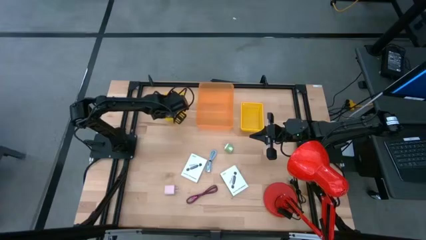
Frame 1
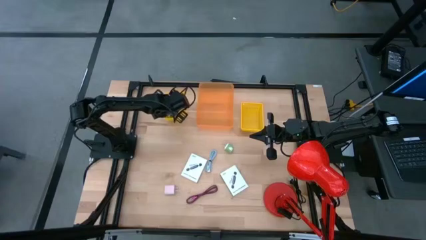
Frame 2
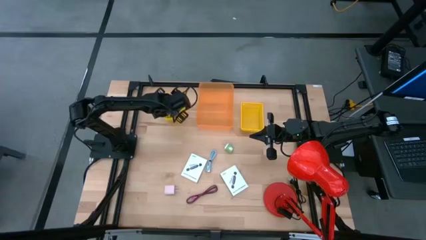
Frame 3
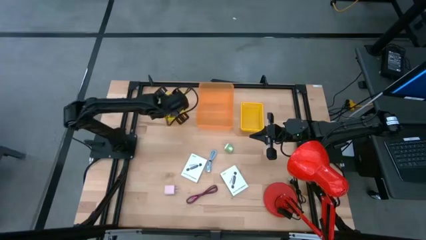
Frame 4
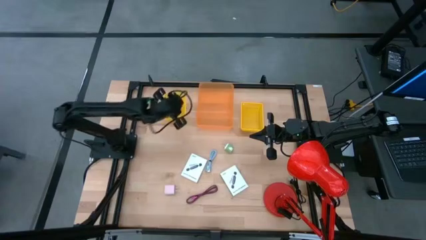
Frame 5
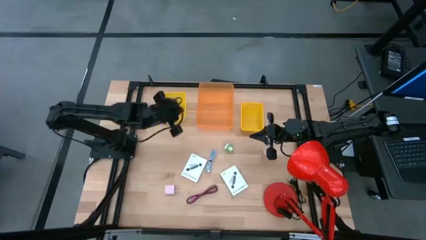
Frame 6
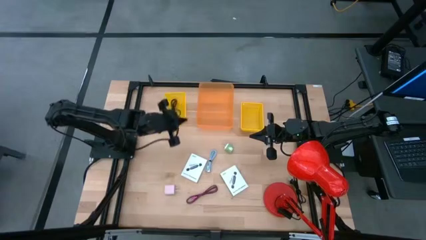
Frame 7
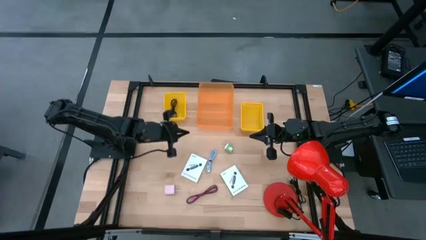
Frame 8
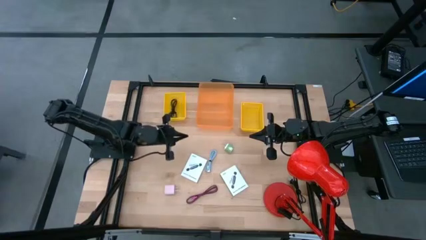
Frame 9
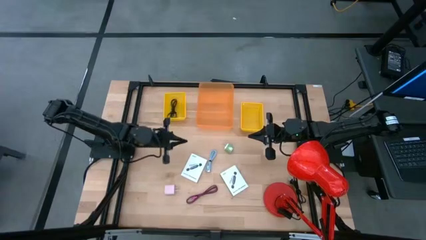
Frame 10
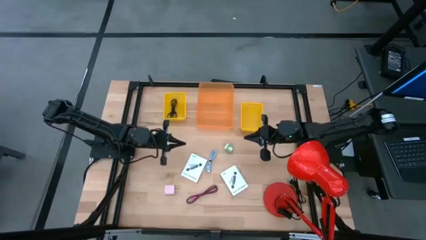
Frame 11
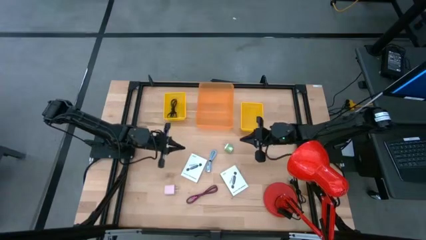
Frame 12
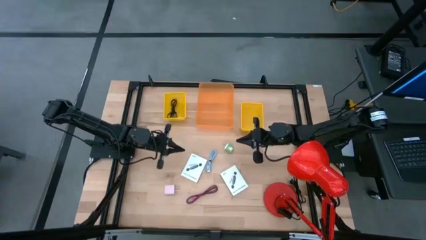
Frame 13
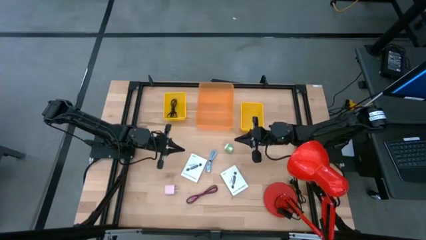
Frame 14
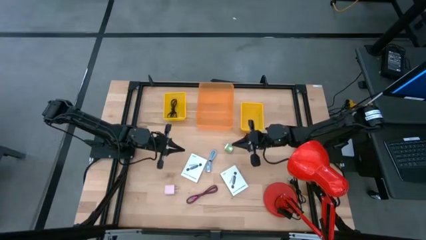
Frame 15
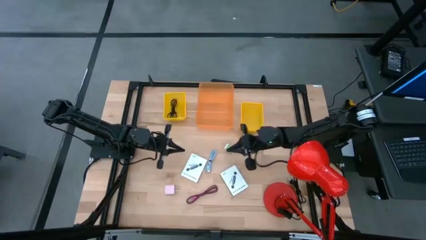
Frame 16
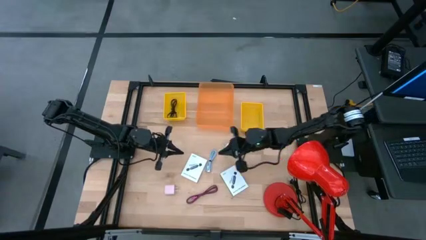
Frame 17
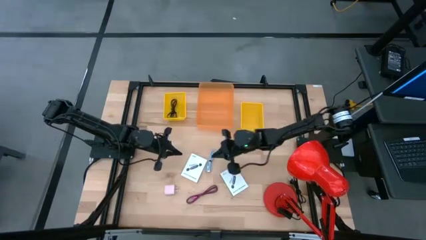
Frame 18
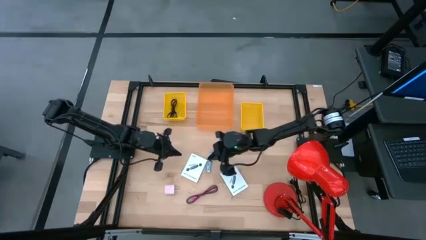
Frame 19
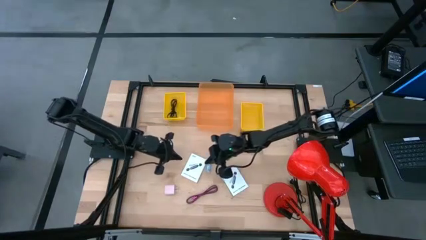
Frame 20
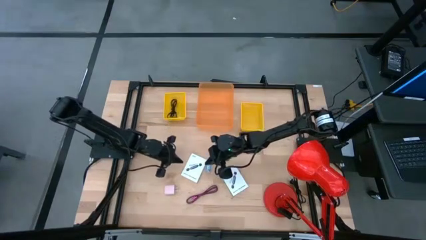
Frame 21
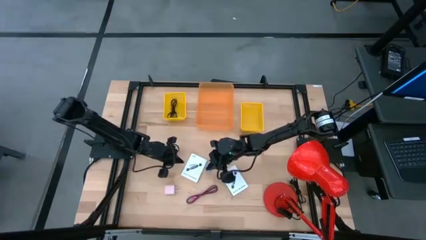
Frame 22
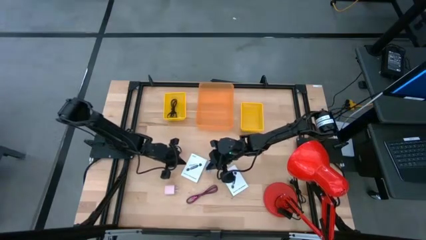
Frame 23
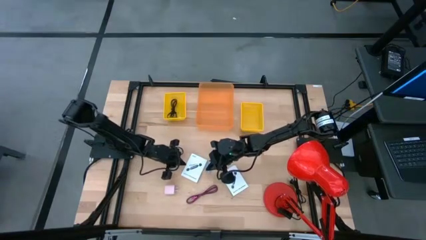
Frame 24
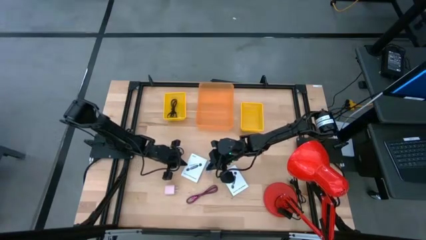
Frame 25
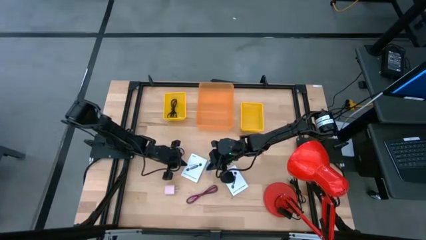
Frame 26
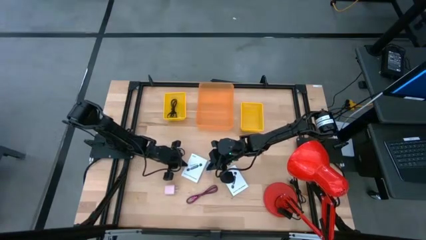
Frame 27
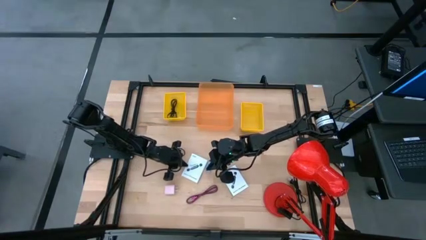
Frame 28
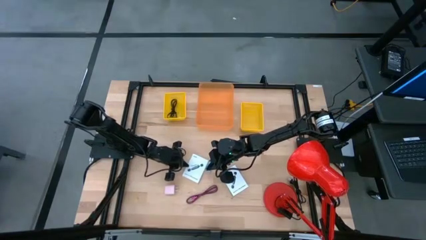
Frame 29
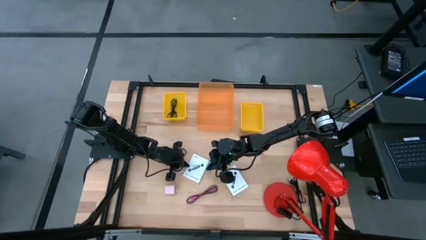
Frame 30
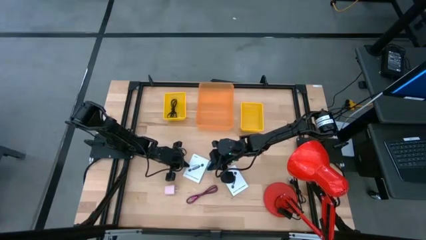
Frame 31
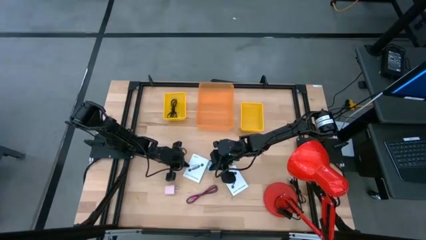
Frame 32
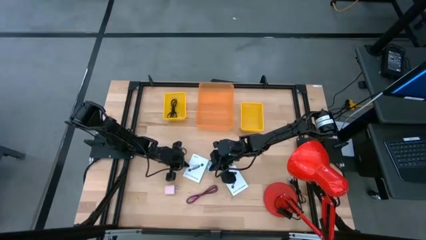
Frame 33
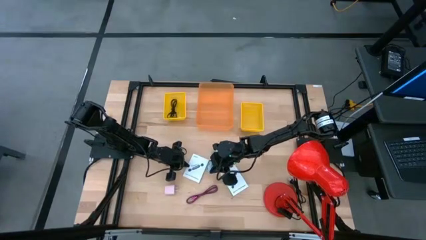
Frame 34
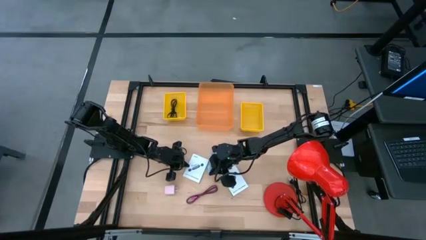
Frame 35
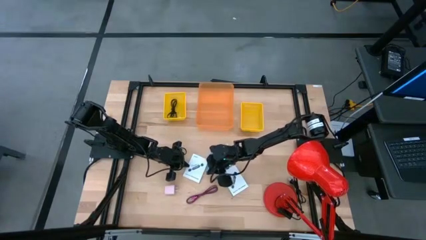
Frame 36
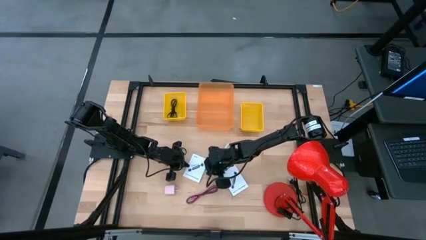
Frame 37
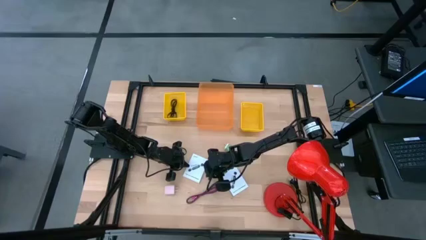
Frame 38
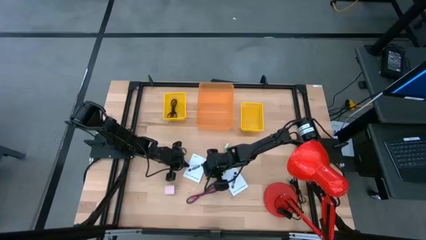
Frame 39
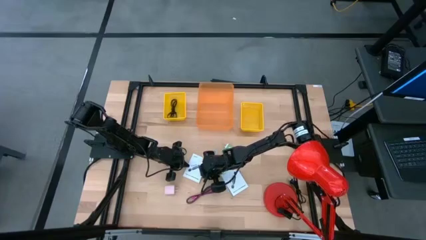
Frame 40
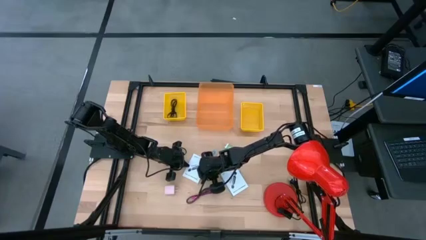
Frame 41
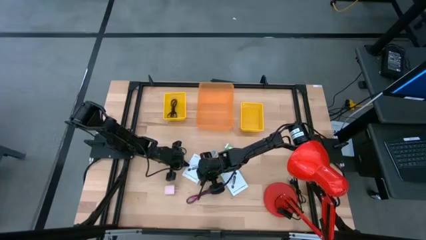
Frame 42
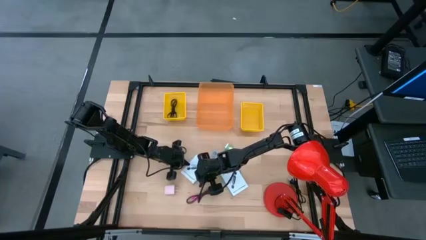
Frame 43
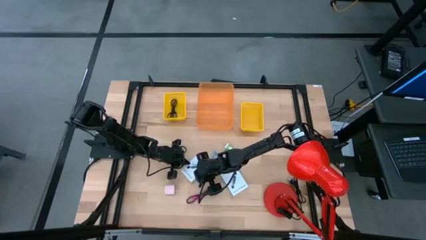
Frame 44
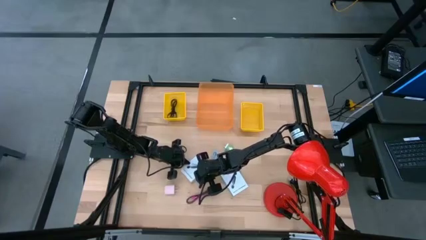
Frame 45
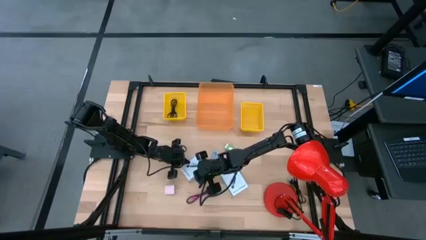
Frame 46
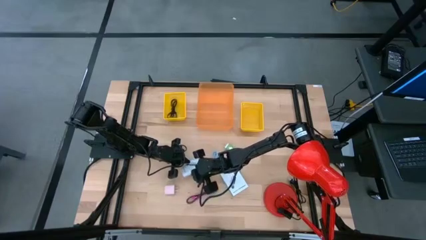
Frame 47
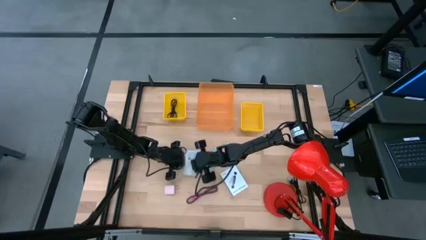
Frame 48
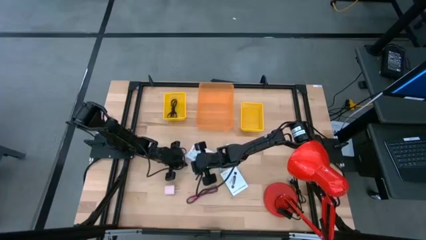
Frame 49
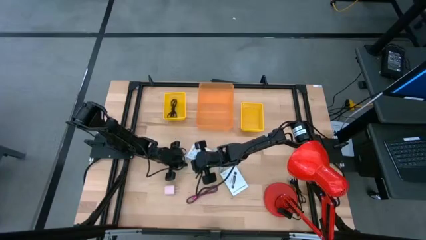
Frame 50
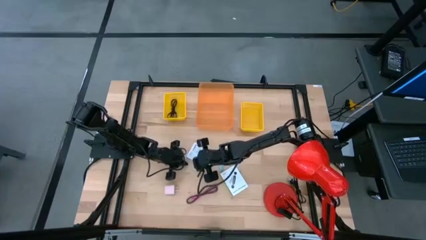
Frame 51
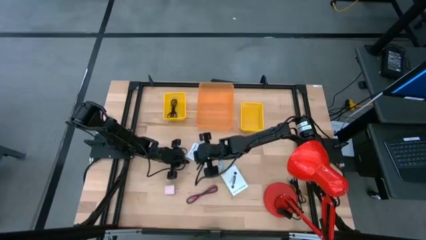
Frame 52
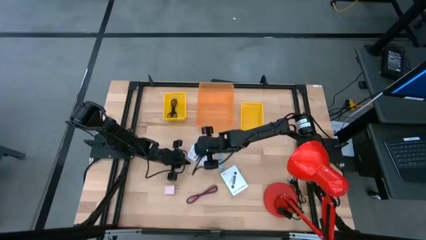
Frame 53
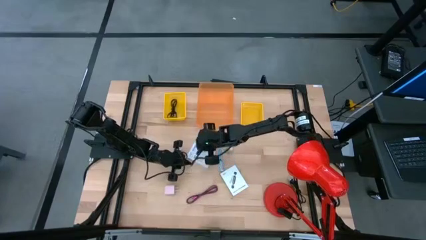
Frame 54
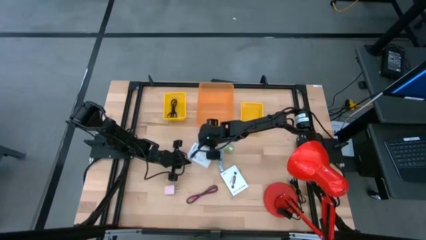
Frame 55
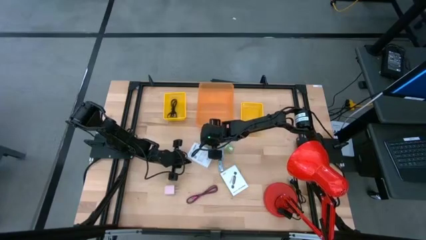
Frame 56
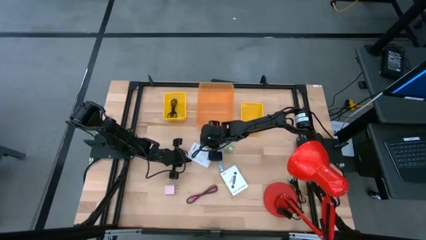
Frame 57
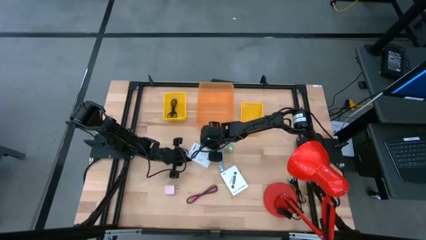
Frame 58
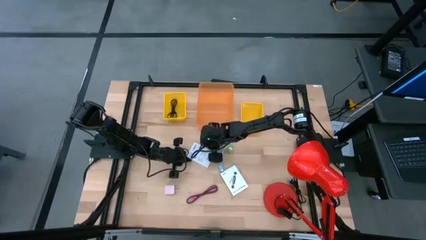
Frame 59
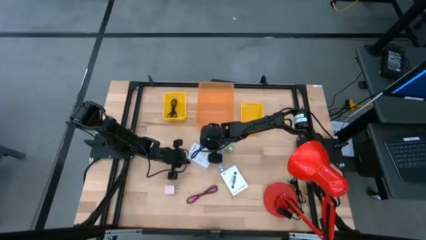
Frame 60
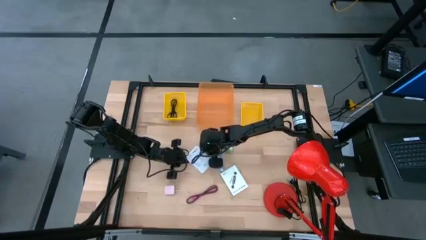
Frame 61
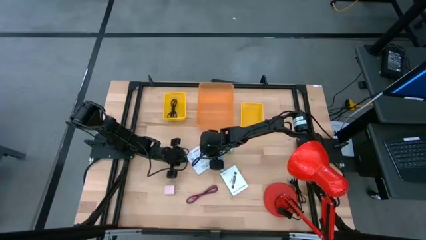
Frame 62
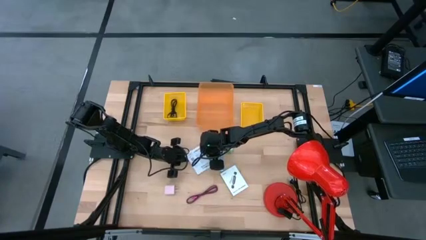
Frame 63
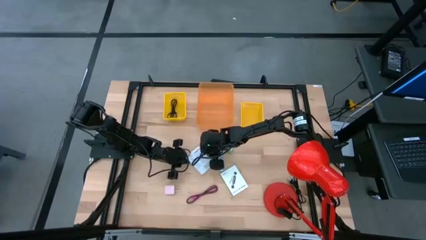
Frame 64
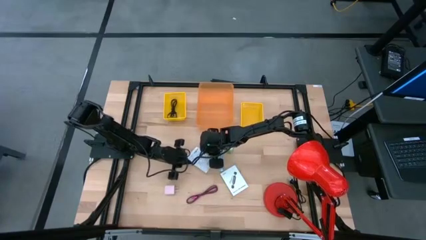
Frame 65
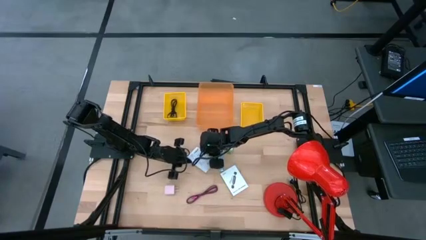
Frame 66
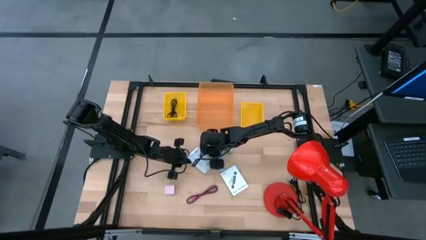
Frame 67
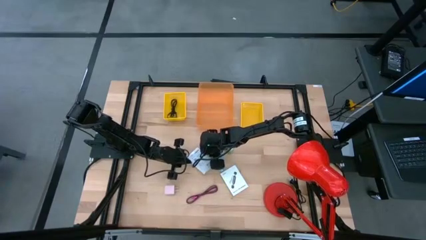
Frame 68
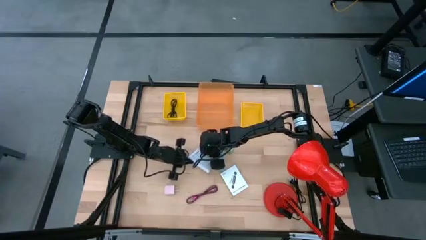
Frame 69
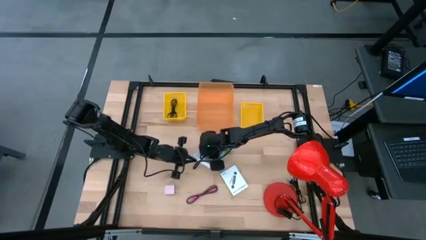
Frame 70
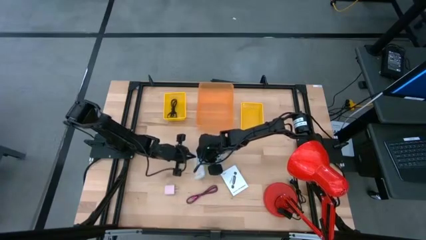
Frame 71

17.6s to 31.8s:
Task: Pick and place items into bin
Put the left card reader box into the orange bin

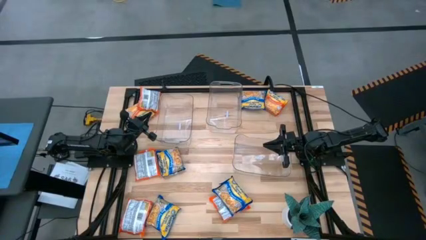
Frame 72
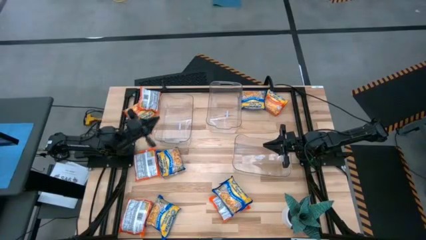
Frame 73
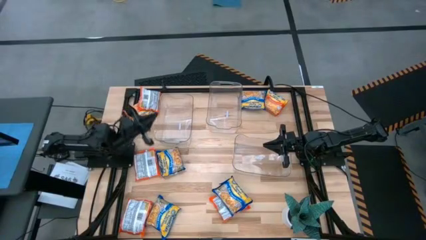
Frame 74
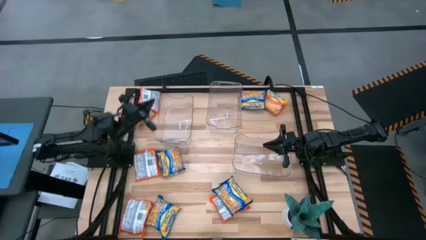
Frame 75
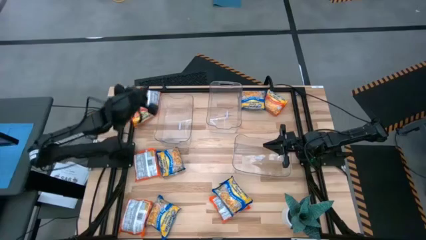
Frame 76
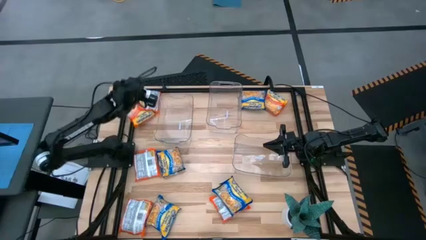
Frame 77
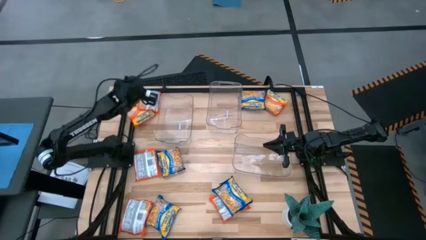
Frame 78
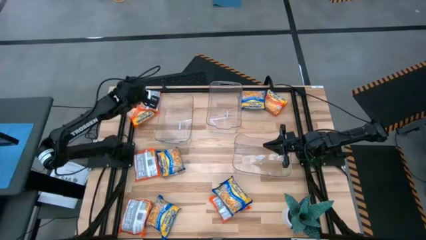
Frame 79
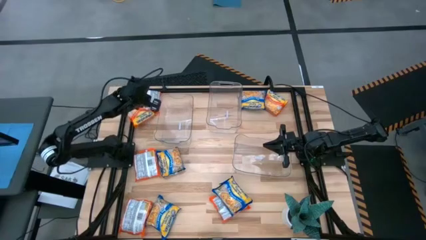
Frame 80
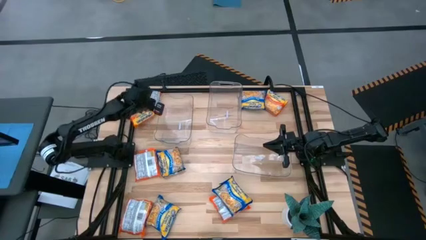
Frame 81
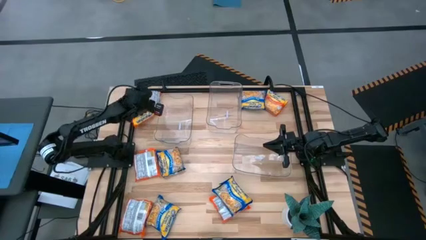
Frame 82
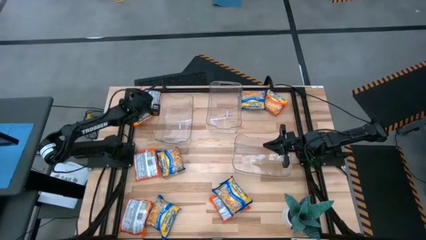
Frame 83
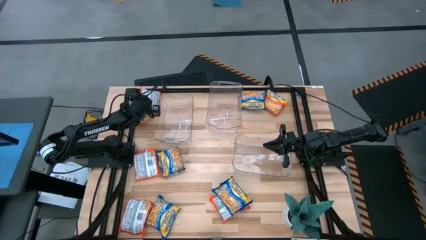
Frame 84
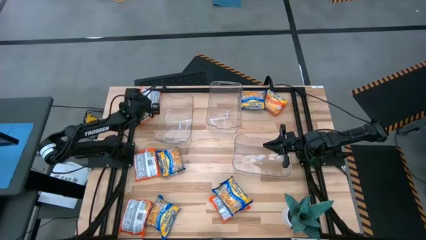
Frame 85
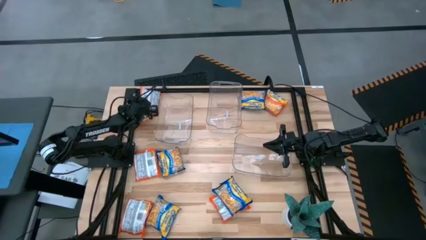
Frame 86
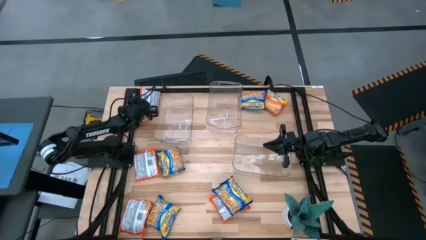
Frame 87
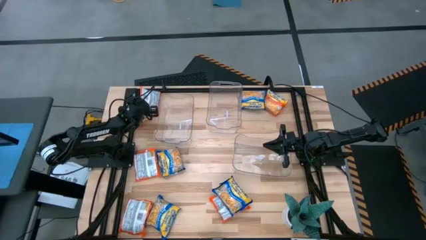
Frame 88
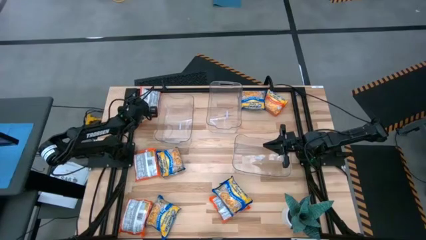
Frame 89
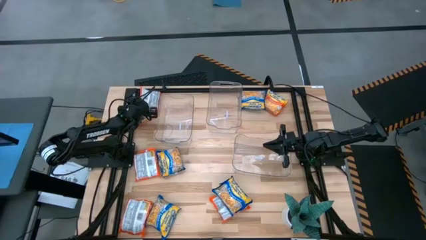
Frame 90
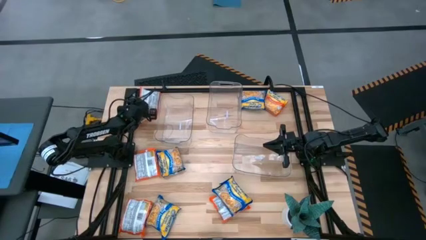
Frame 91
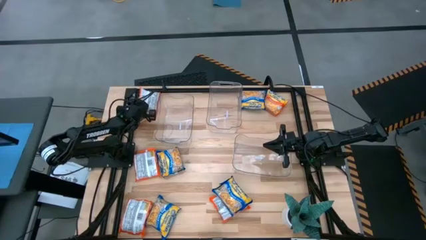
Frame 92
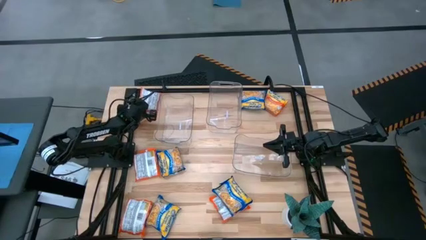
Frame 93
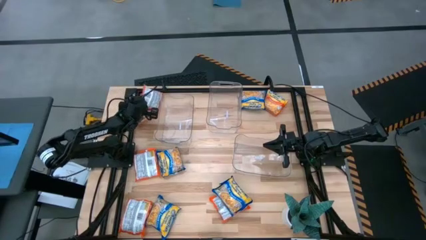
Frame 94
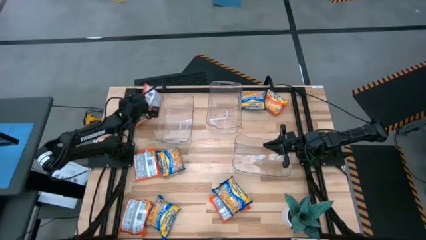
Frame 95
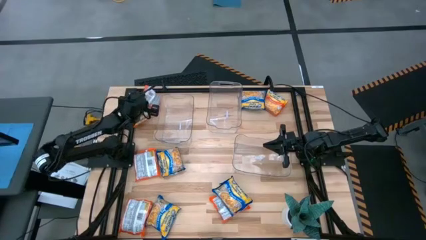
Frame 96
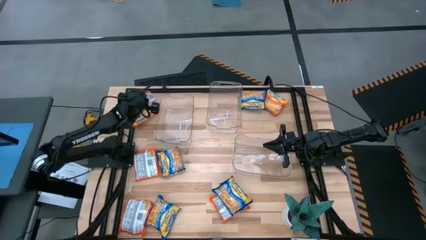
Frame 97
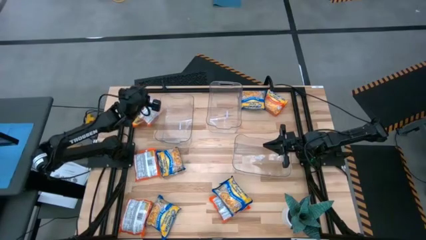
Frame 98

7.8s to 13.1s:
Task: Sort Maruchan noodles
Put the orange bag into the left transparent bin
